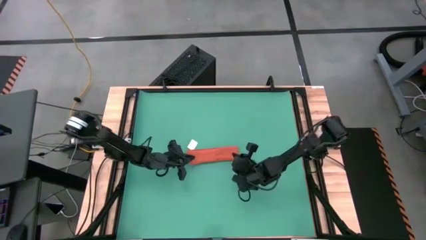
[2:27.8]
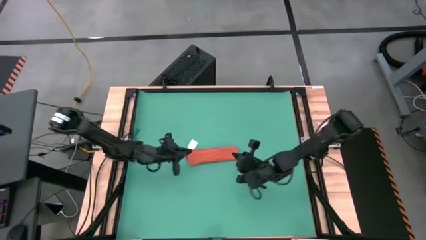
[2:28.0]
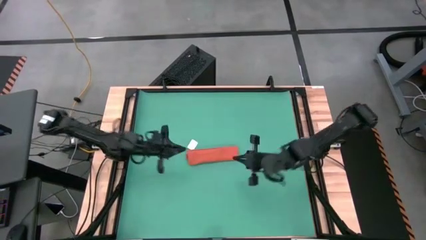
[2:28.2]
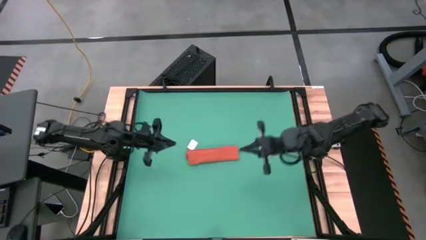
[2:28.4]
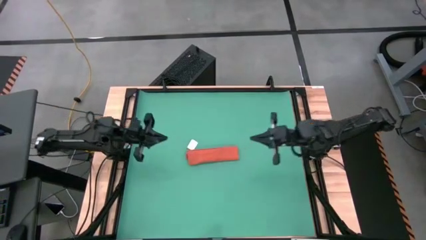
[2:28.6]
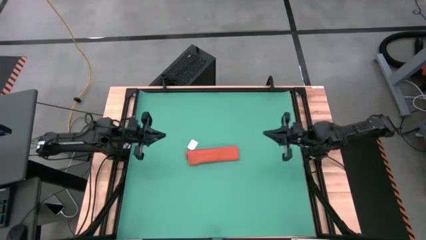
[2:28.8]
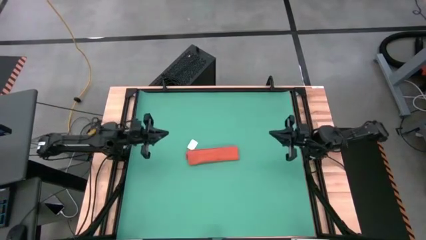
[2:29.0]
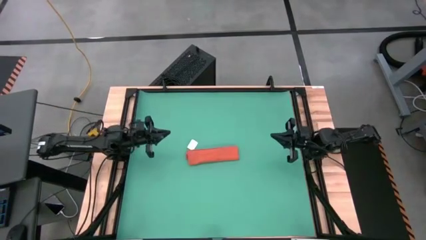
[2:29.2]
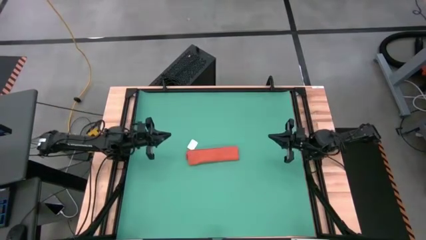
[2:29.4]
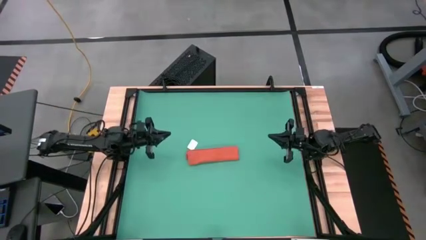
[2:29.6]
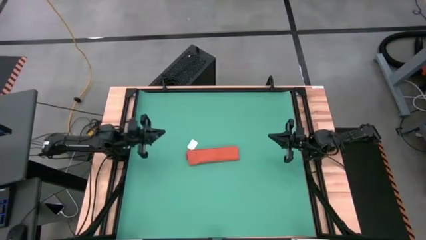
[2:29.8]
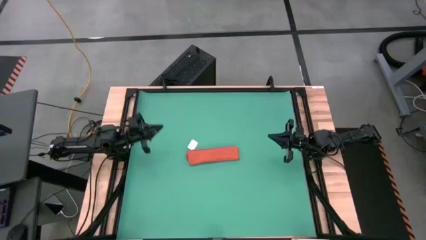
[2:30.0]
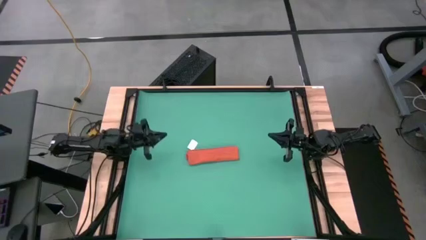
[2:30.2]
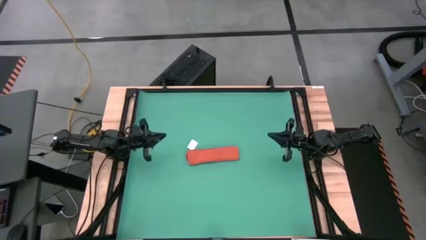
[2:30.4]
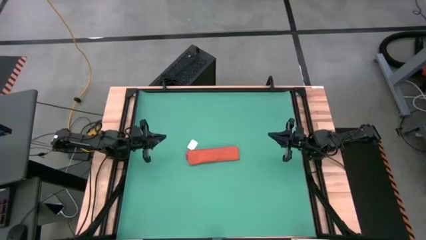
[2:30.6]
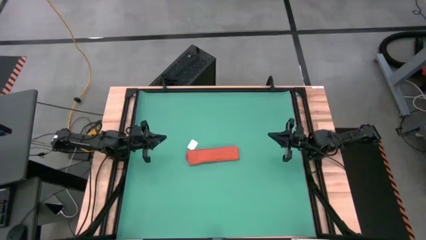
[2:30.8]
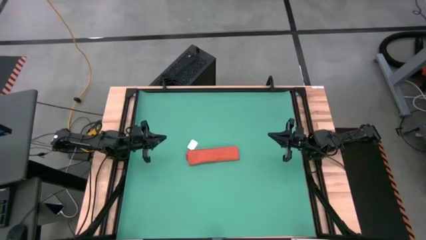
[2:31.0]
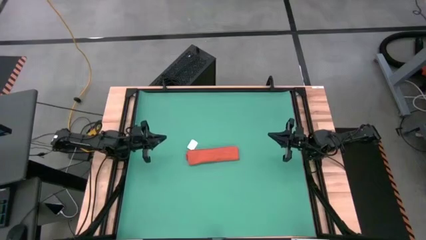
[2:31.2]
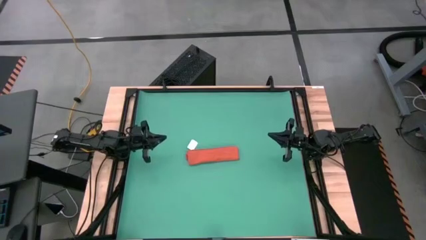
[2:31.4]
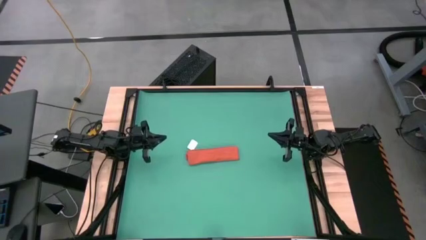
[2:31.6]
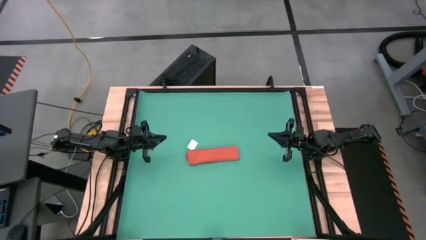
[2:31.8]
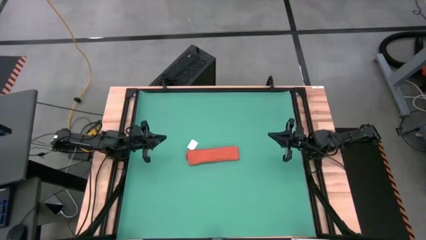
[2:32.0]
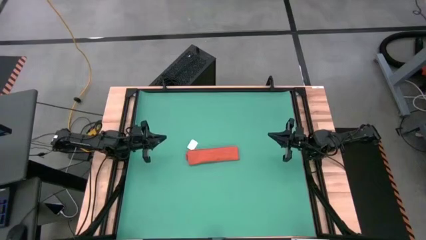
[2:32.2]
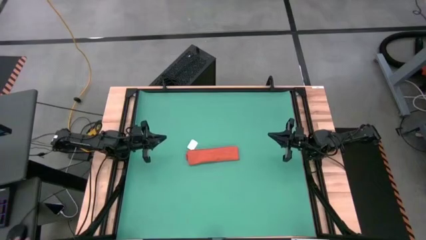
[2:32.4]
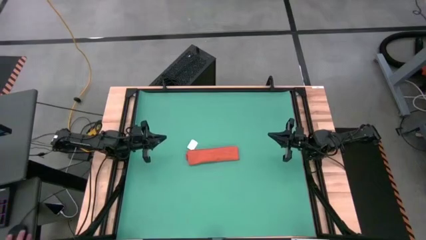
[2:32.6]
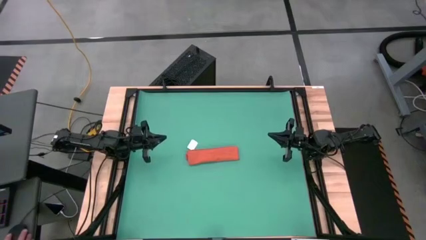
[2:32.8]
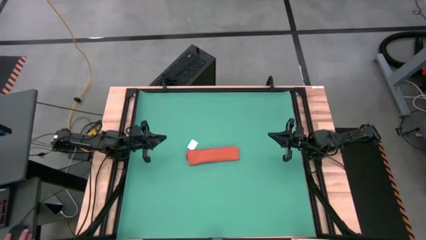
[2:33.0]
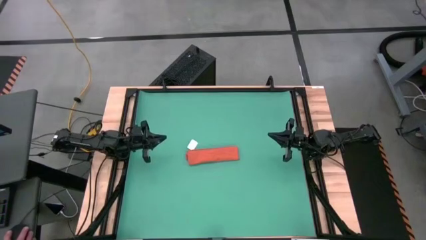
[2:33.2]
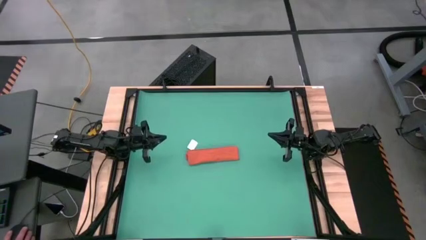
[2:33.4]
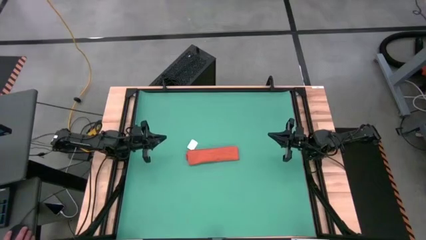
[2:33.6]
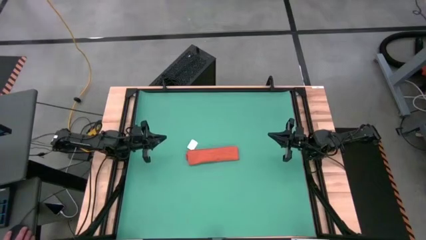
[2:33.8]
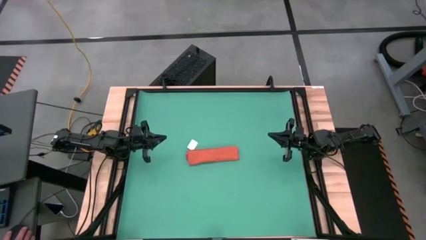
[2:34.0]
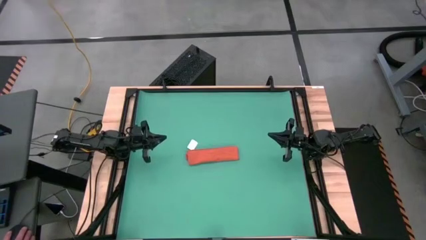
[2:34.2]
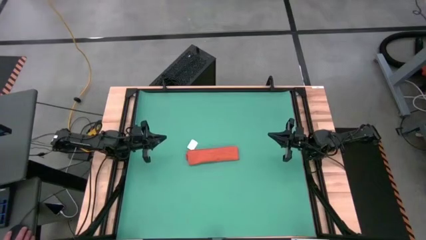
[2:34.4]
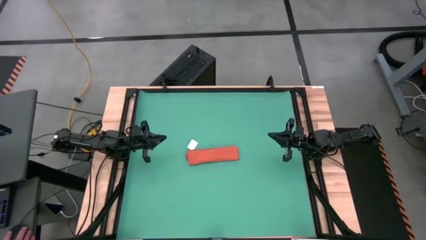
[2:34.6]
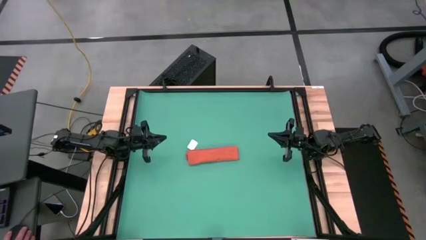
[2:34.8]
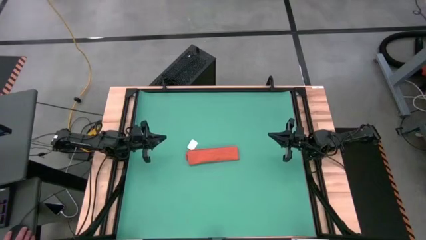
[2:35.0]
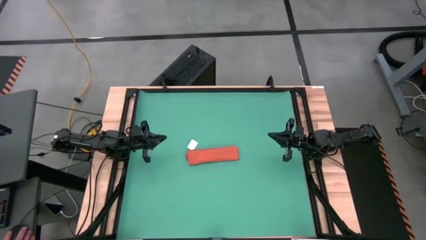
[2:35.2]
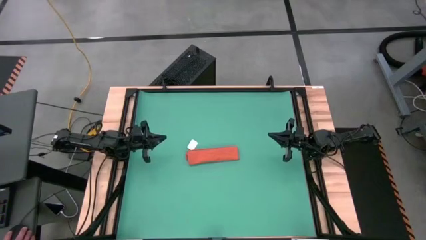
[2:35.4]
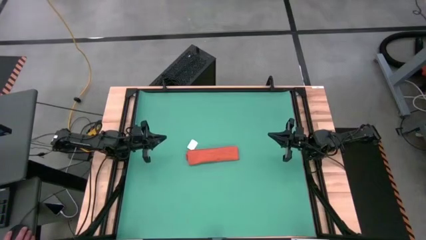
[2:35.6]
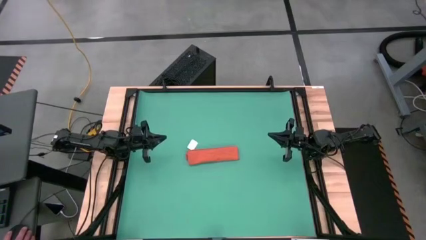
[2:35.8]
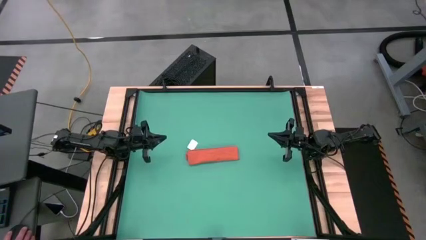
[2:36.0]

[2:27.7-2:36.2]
Task: Roll towel into tight, uniform cylinder
Return to Home Position

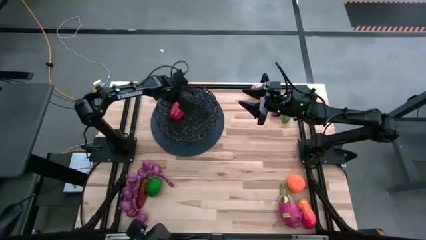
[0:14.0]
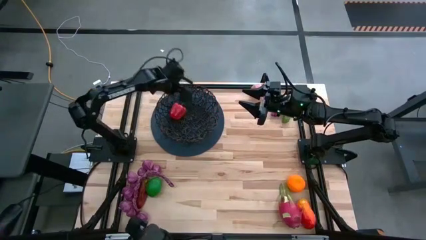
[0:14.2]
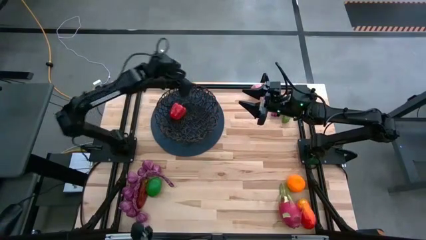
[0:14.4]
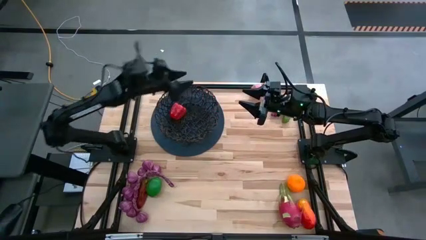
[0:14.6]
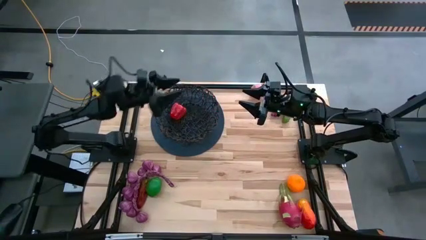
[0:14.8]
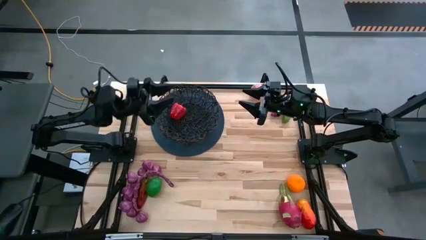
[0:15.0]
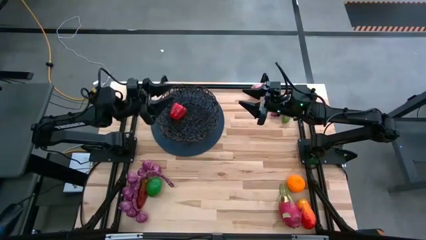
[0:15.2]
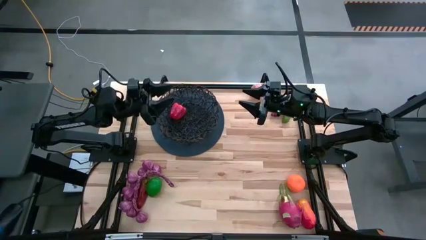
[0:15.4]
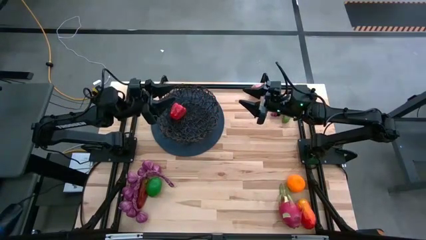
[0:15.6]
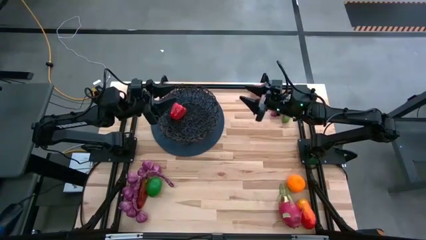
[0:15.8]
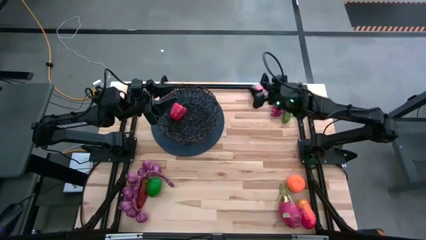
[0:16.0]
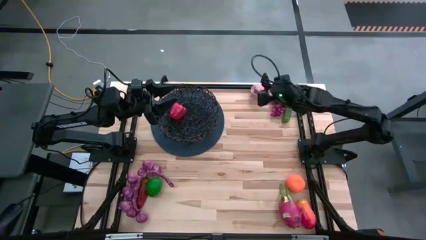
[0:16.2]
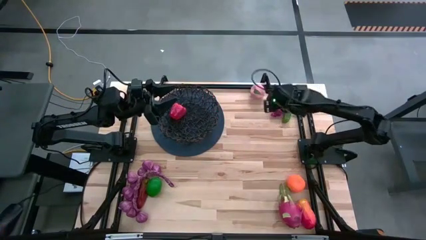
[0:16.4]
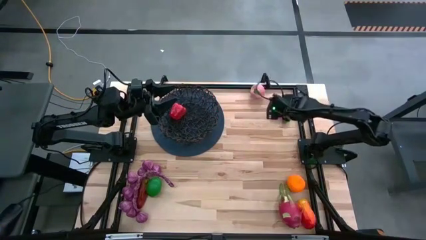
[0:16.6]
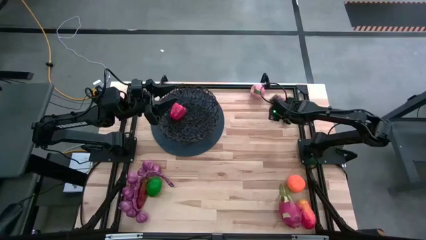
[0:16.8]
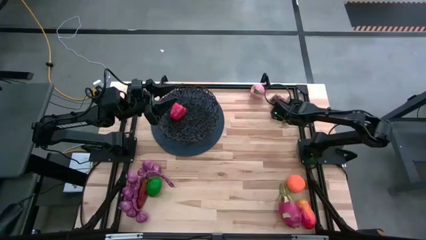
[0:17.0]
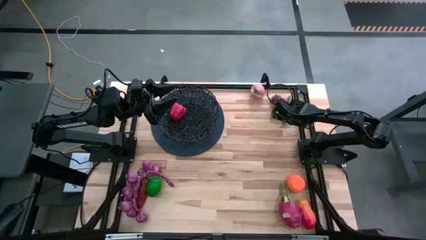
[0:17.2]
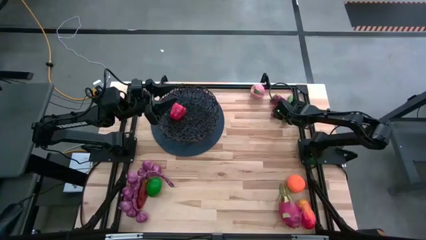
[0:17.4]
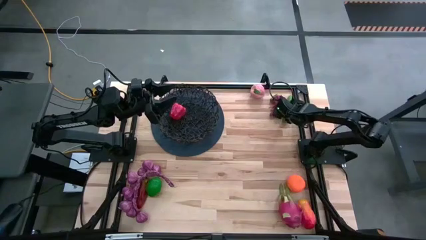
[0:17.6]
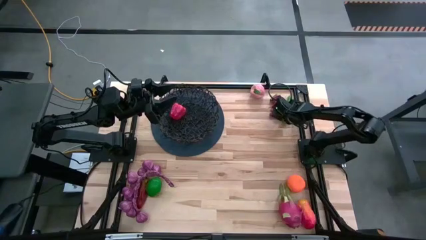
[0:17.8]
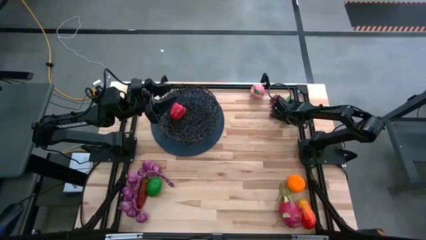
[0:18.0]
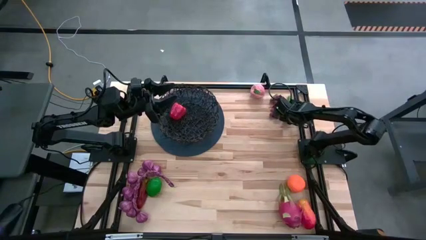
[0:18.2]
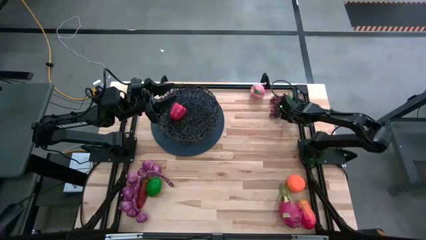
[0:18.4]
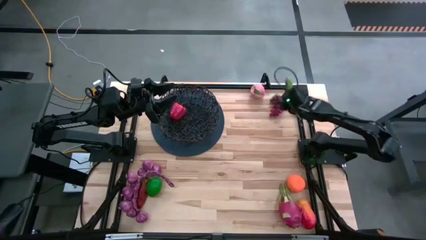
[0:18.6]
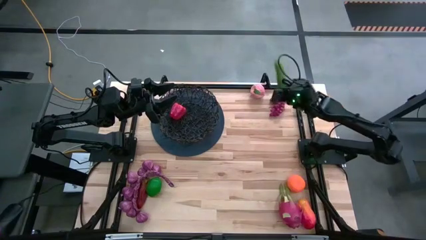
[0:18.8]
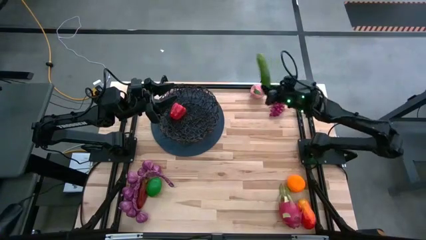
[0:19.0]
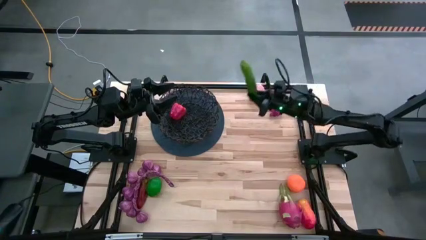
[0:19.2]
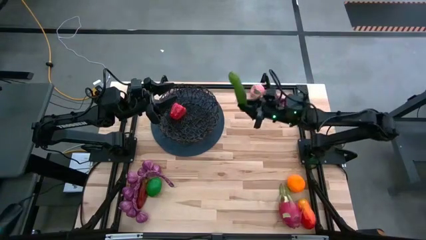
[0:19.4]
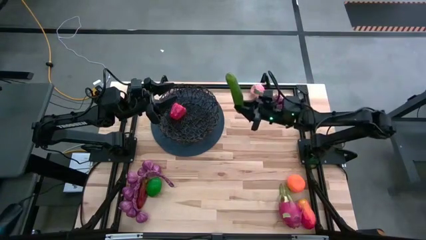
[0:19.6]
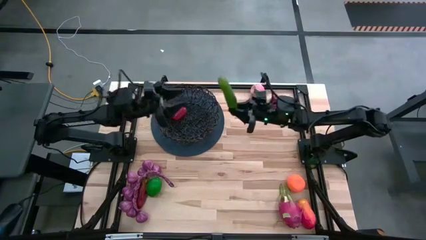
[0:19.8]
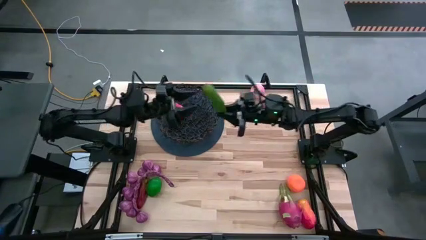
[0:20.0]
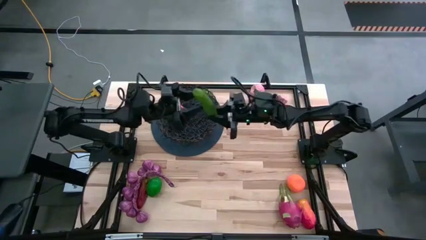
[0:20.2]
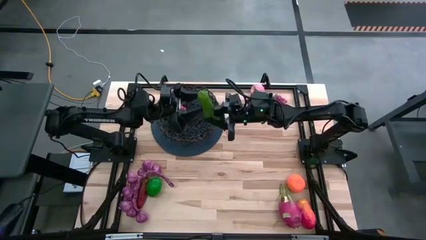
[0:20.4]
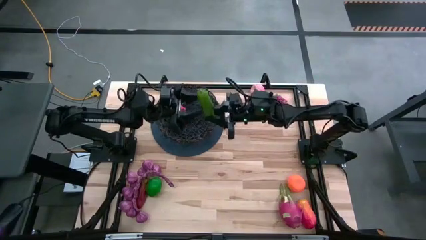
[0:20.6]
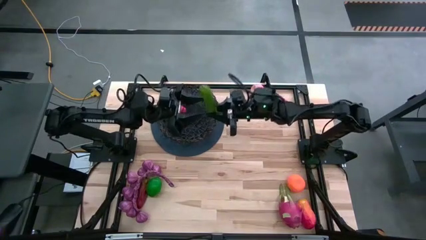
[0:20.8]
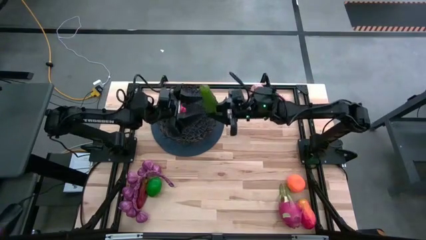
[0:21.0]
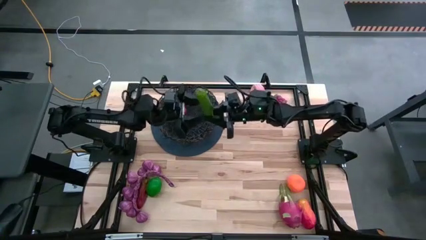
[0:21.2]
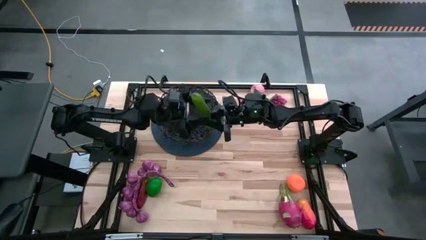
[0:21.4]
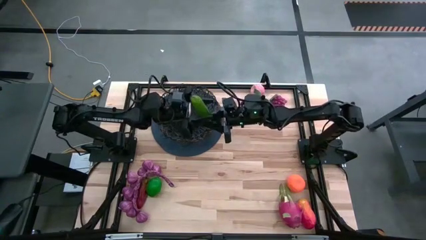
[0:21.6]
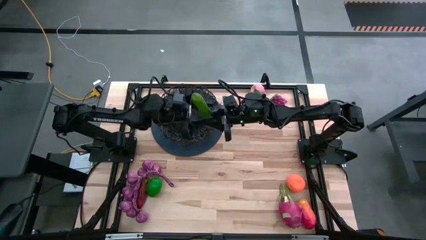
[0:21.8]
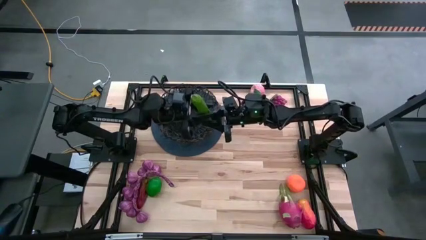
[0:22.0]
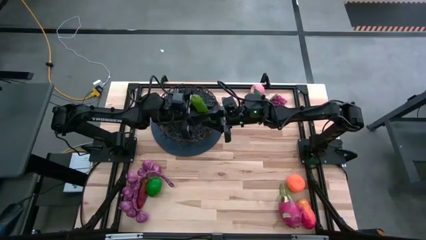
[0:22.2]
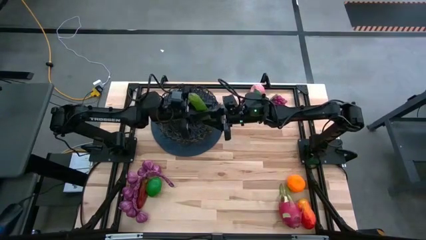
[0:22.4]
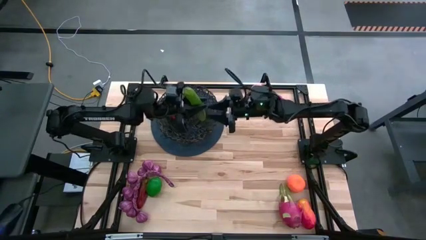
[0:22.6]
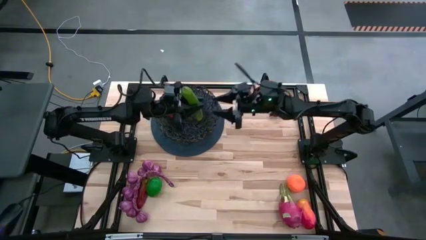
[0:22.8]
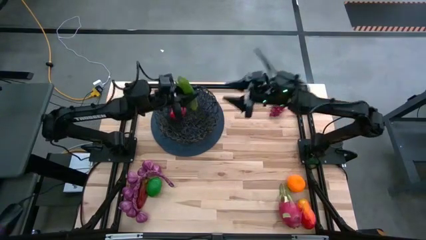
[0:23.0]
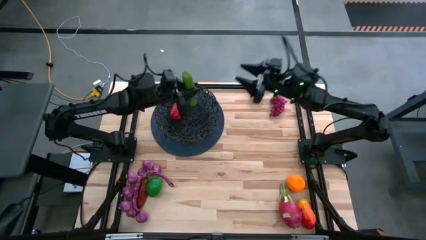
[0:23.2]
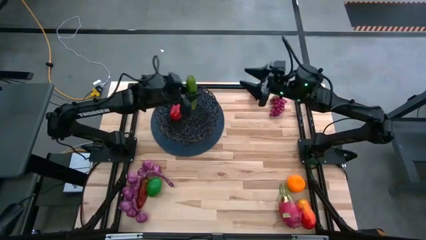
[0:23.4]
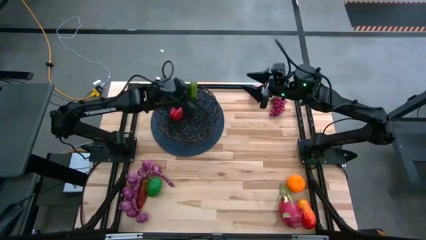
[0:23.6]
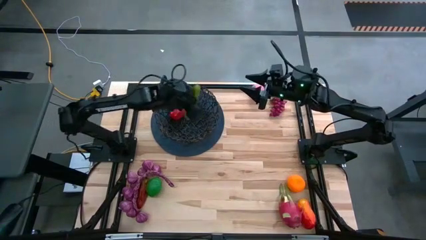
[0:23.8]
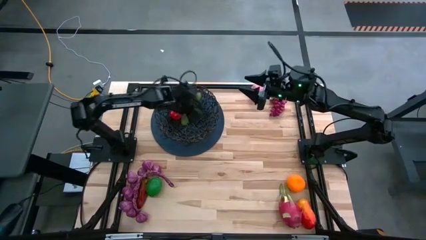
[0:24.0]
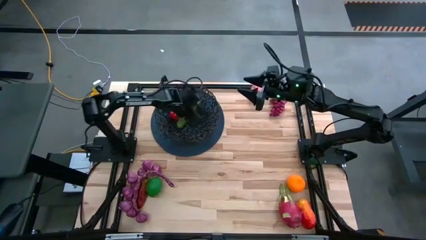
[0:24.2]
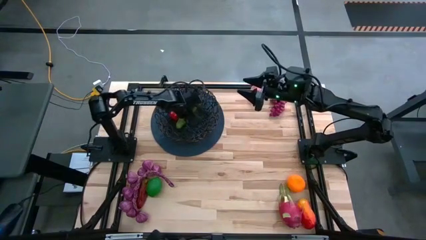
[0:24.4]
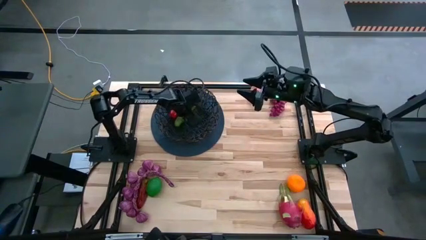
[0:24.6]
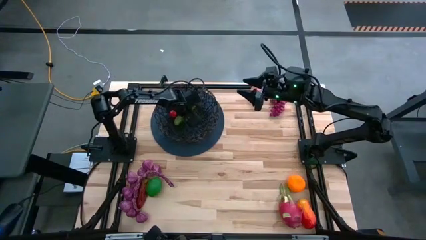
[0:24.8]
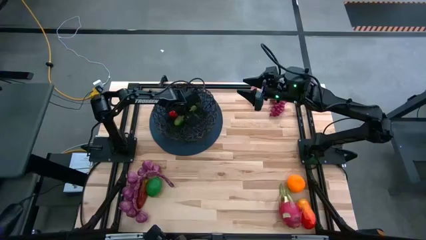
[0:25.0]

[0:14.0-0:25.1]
Task: Build produce basket
Put the green cucumber into the black wire basket
